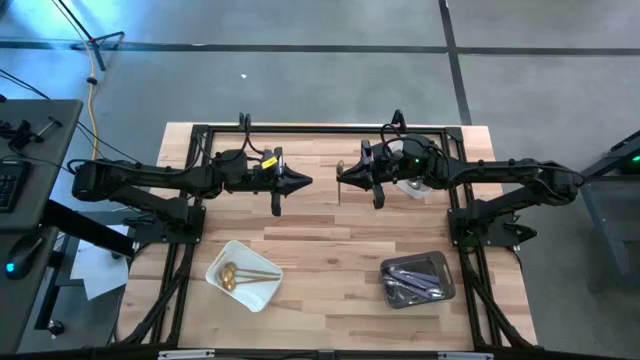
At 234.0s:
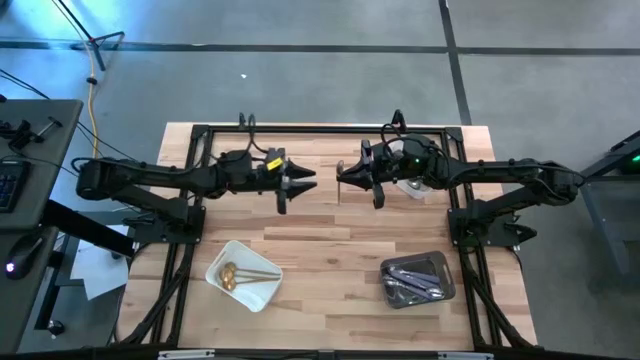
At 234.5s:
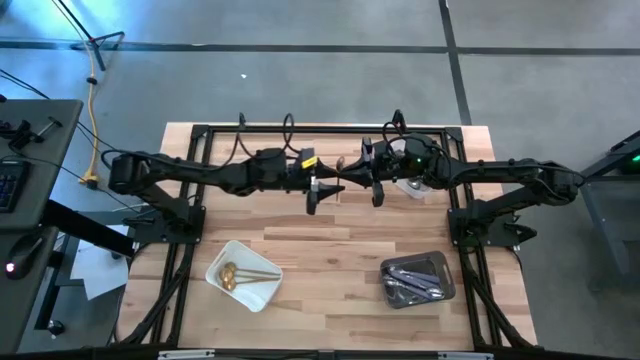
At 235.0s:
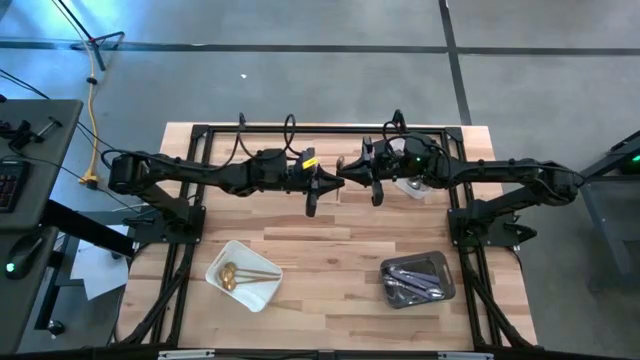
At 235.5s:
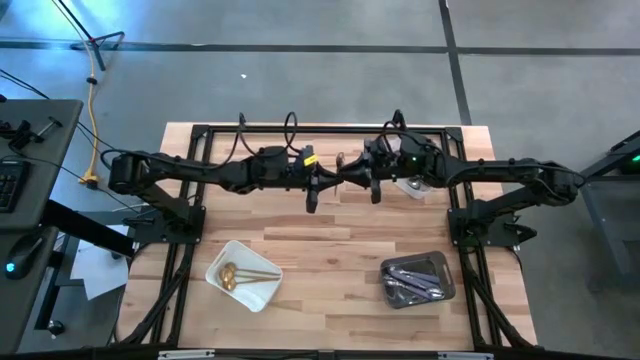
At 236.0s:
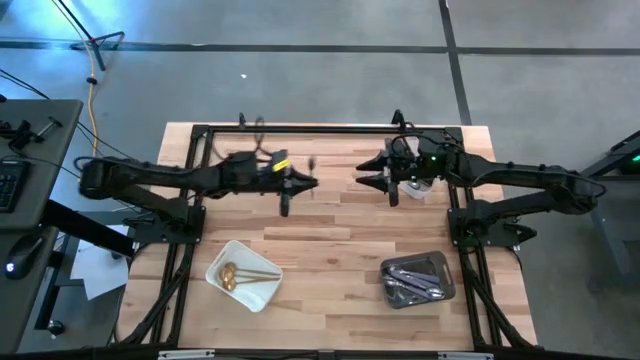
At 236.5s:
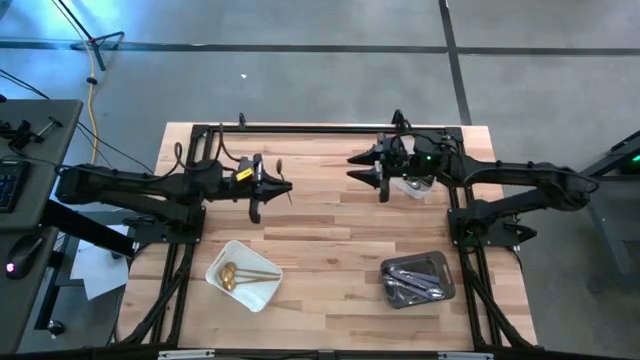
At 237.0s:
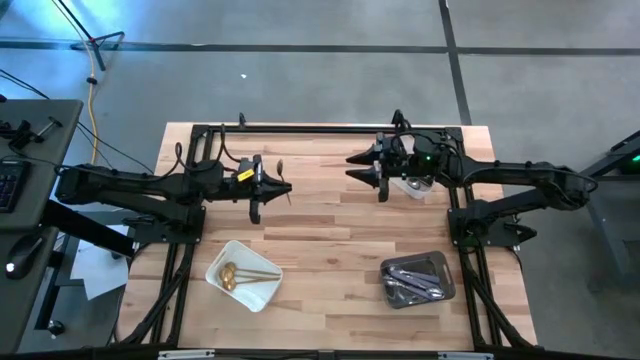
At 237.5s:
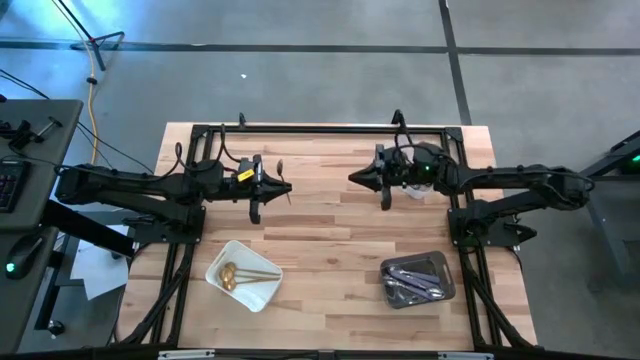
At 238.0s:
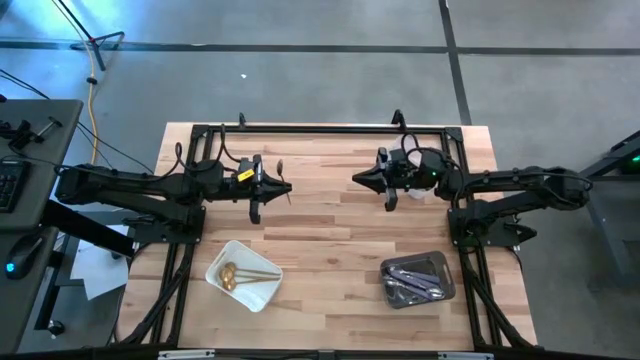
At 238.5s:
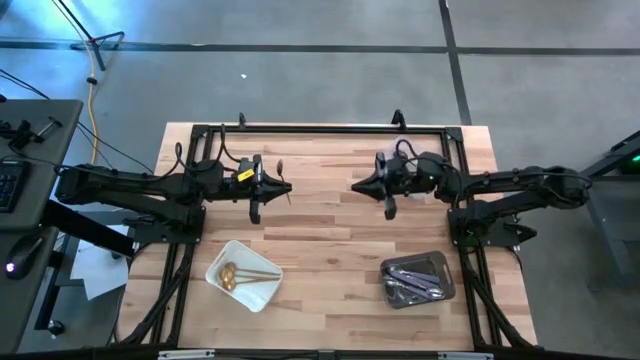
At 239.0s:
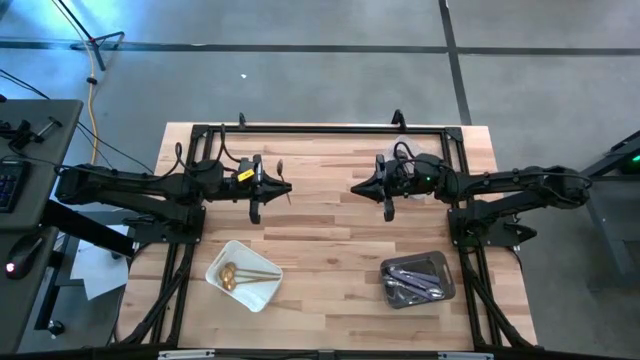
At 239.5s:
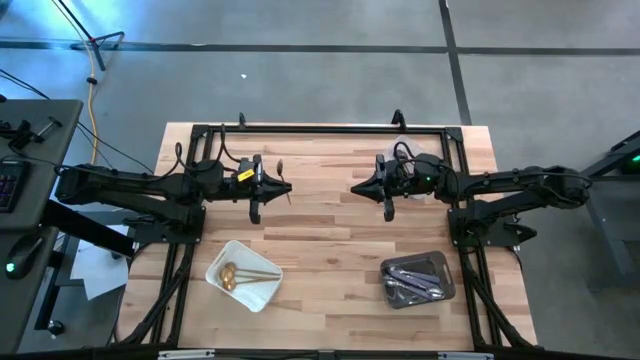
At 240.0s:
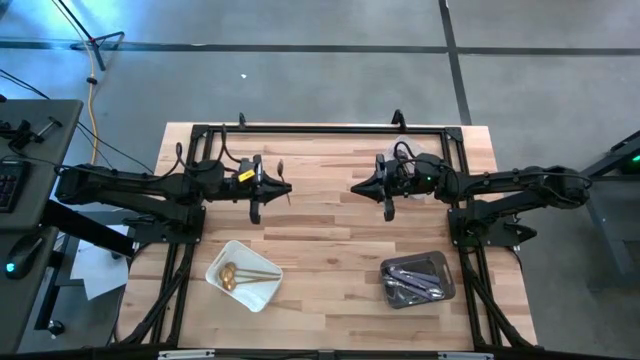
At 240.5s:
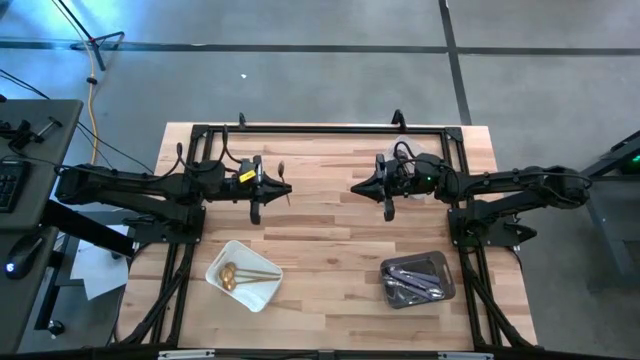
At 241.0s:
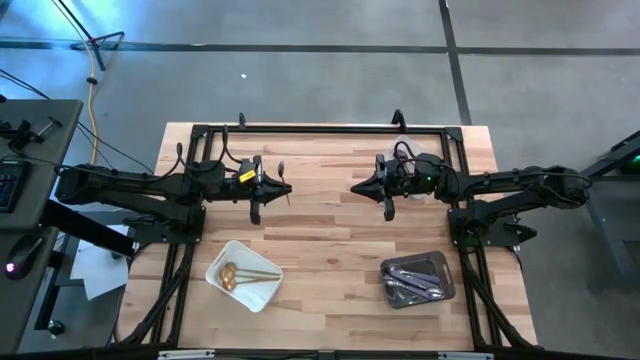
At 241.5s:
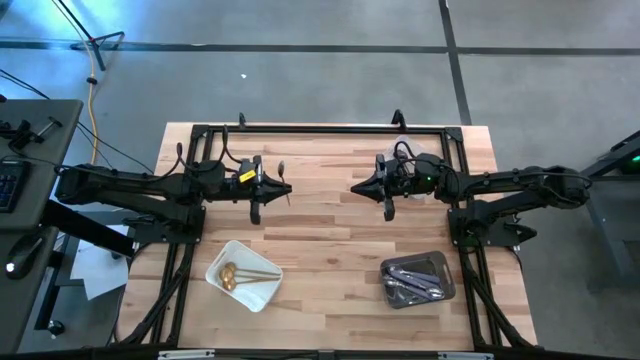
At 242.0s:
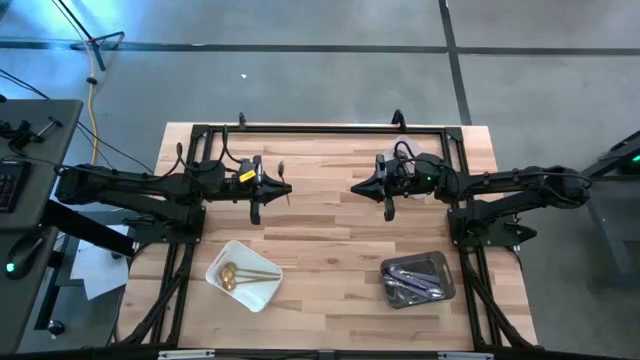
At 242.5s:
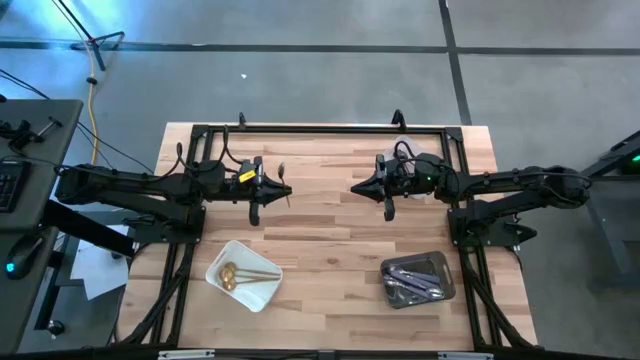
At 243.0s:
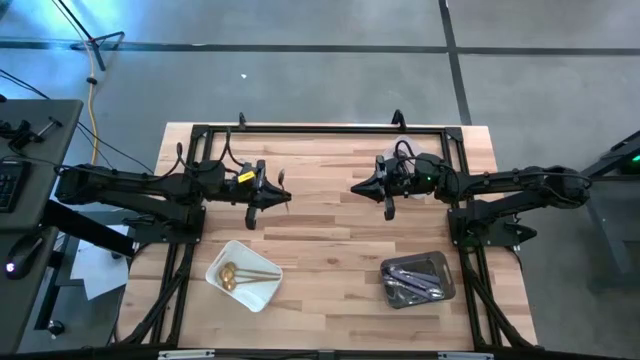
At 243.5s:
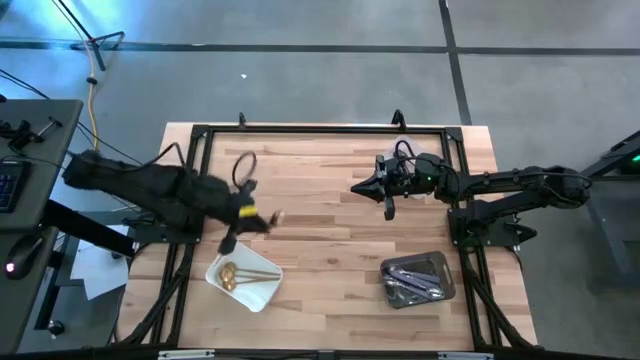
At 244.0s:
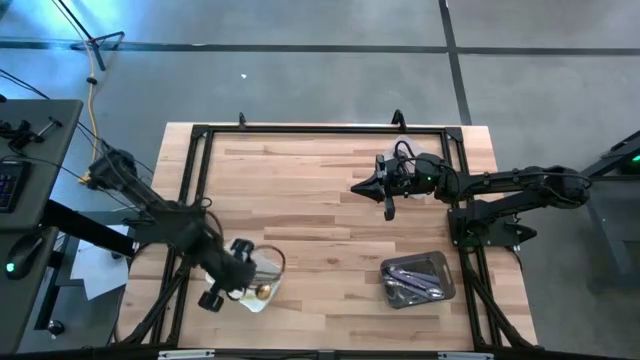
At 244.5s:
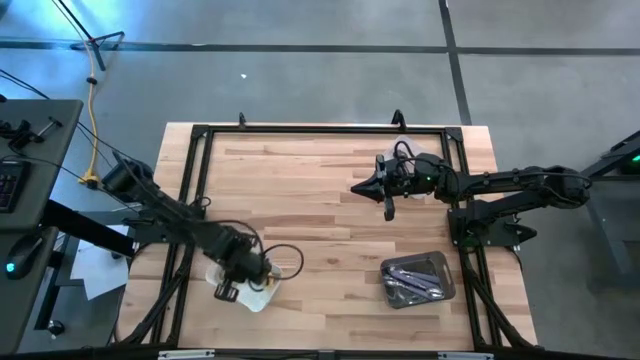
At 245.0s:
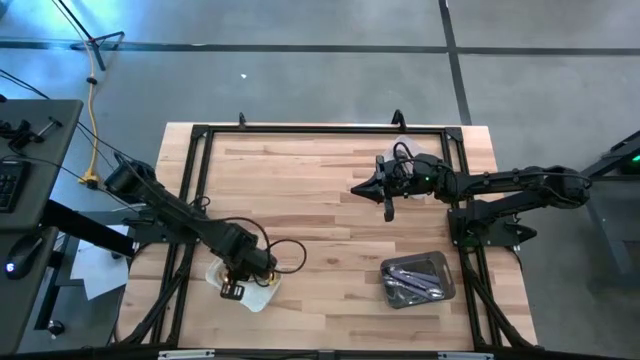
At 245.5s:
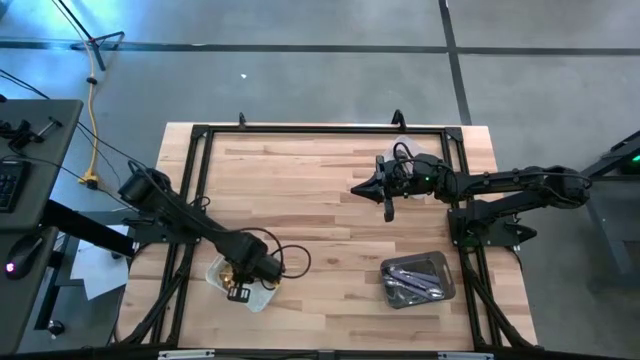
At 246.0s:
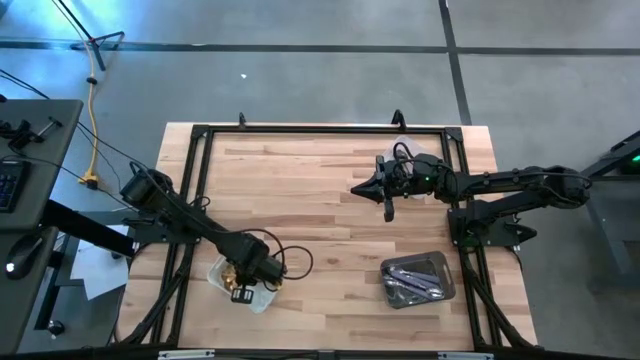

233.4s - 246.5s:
Task: Sort silverware by color (type)
Put the gold spoon into the white bin

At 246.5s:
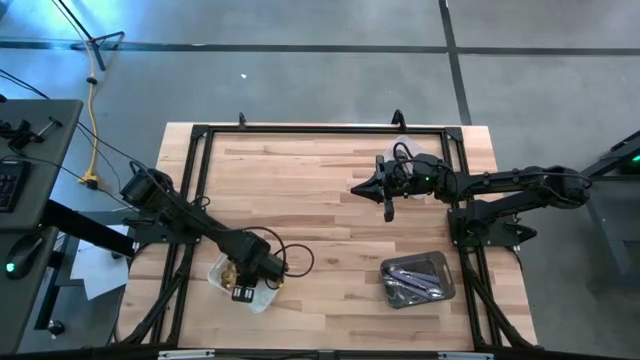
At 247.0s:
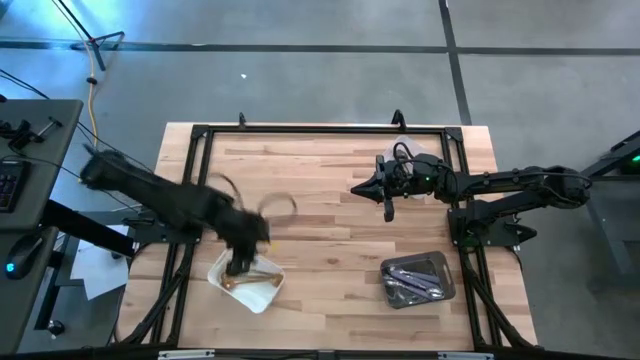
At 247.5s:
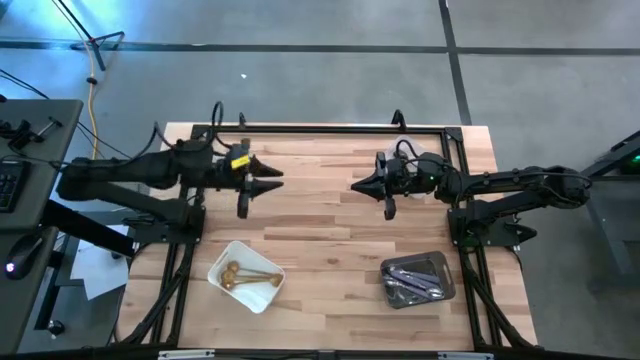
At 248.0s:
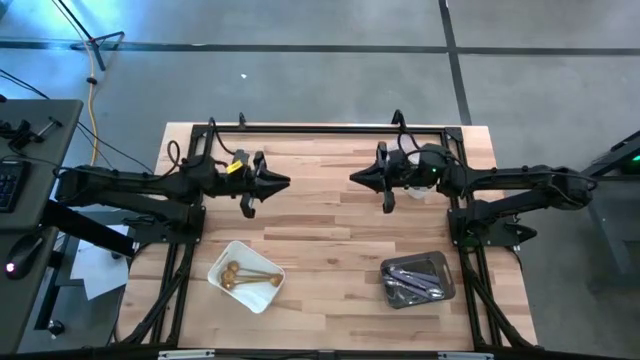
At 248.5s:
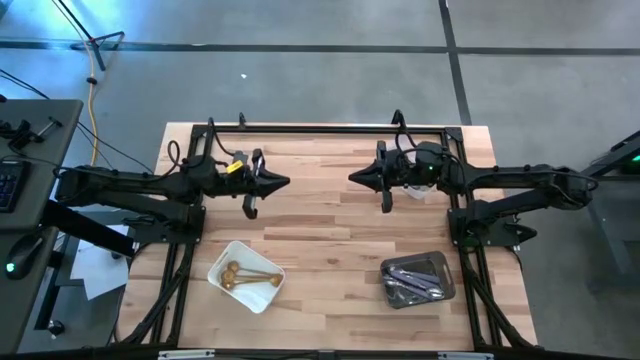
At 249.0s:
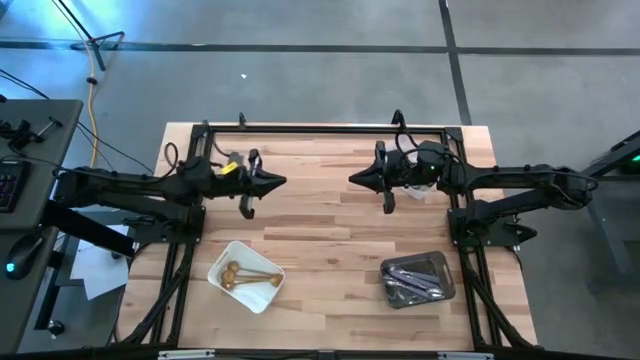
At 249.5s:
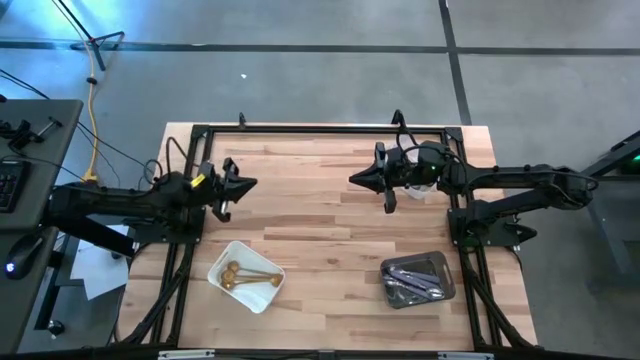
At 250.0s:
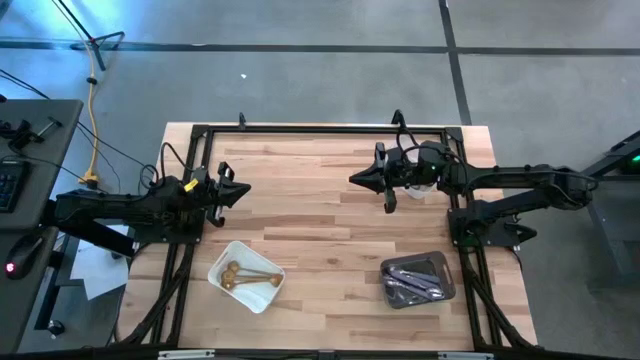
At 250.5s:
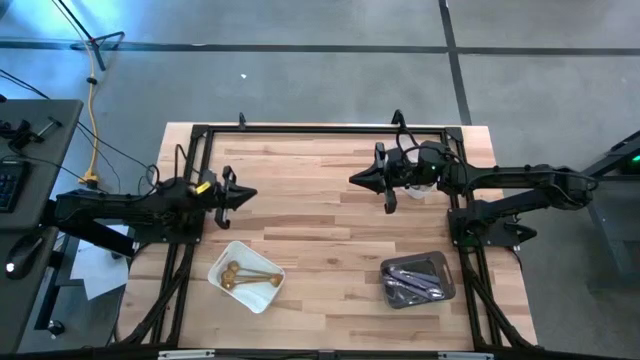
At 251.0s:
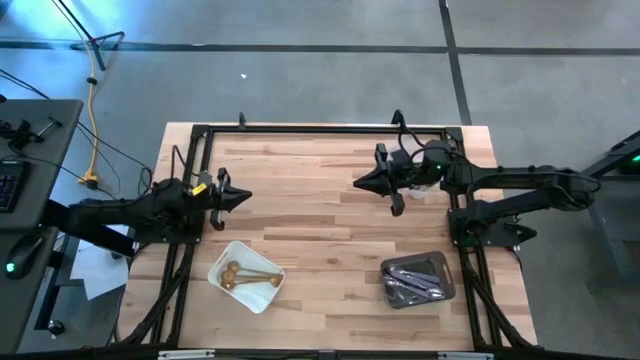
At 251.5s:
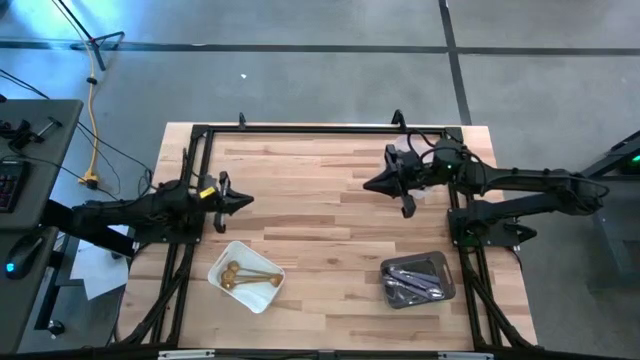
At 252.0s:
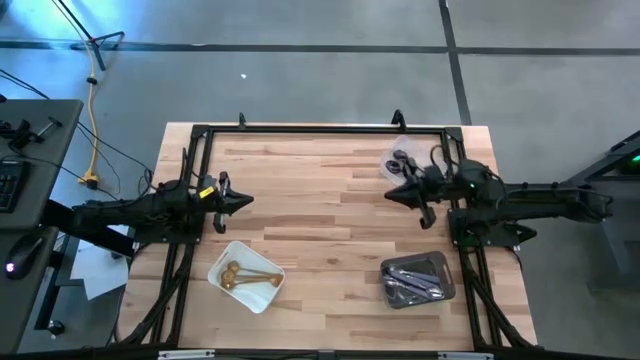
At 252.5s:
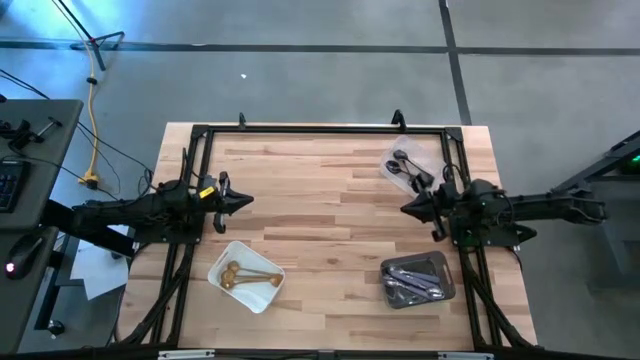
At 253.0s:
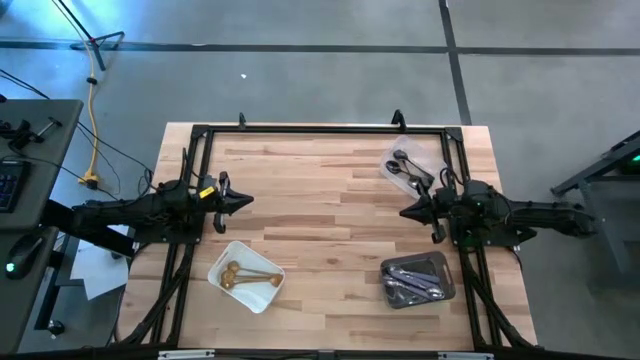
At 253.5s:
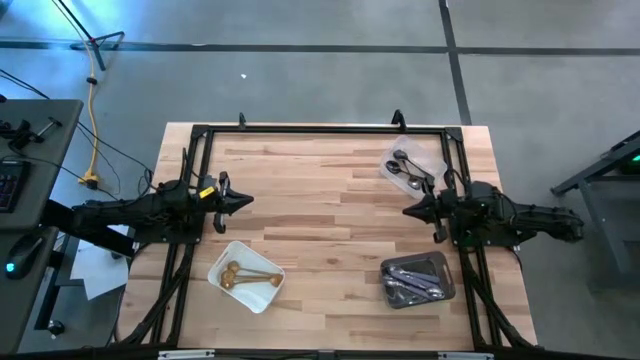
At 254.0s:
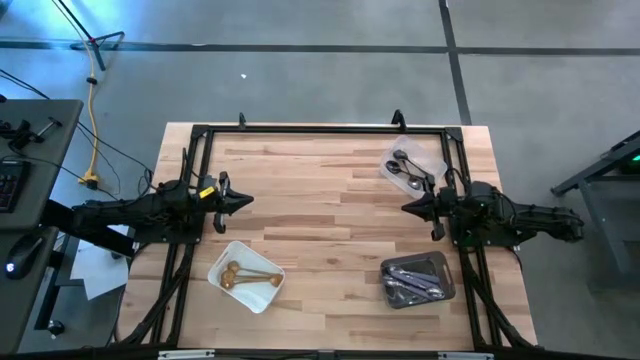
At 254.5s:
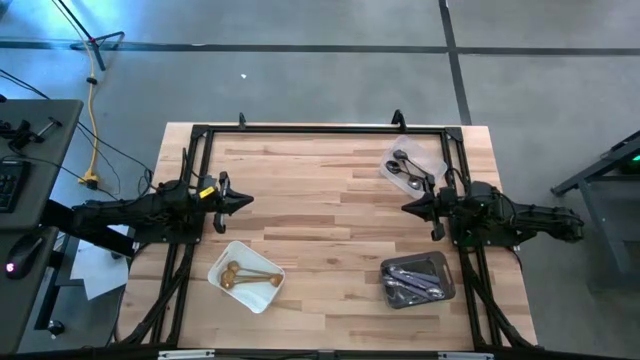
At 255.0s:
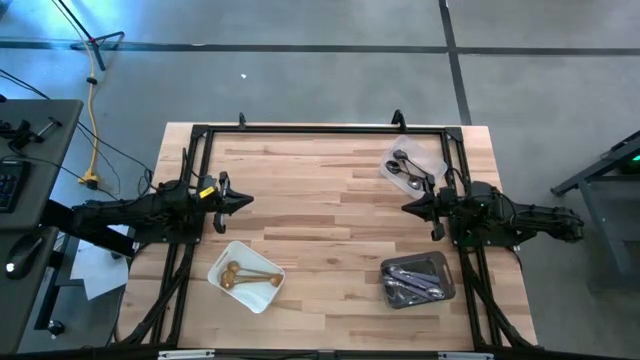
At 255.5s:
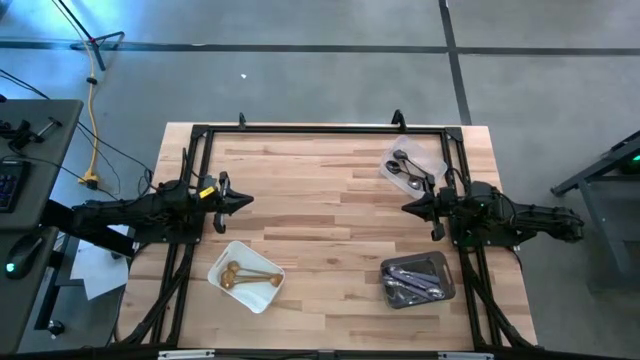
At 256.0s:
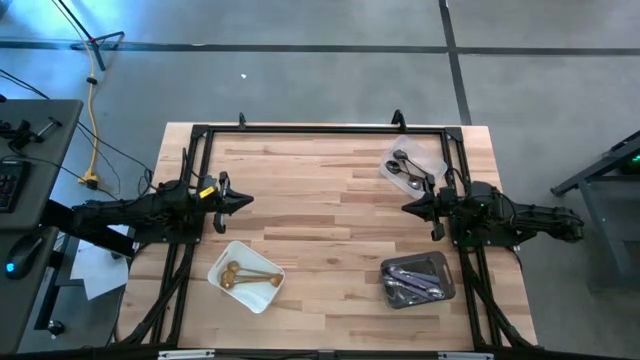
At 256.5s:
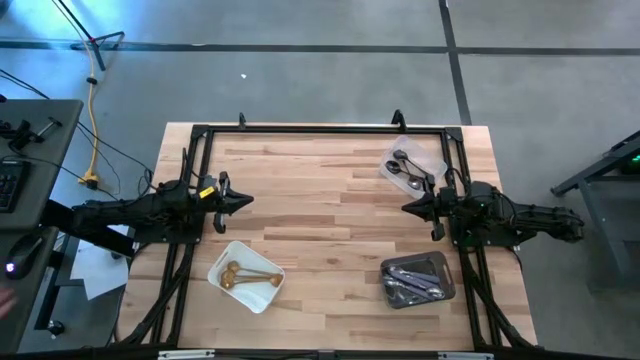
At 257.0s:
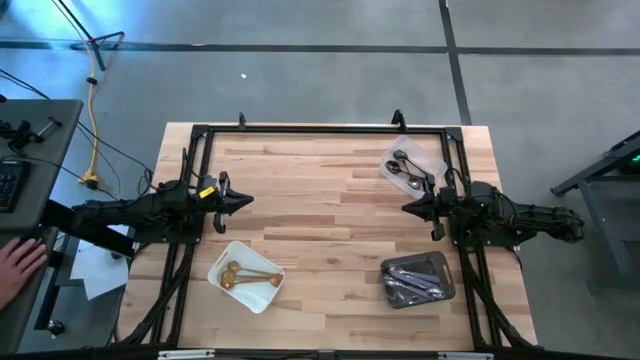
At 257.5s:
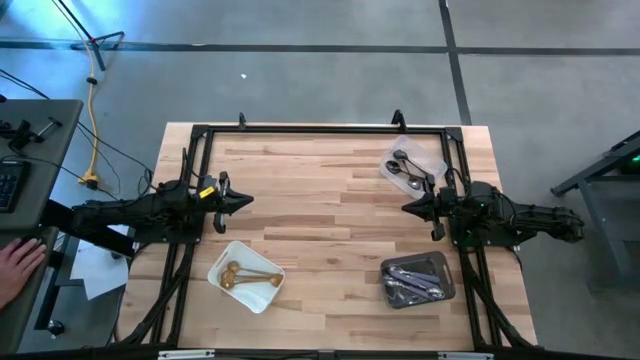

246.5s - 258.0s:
Return to Home Position
